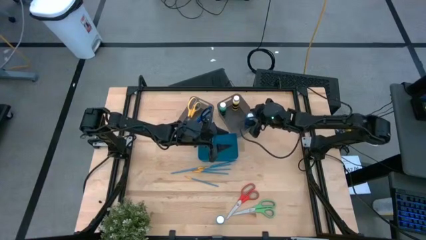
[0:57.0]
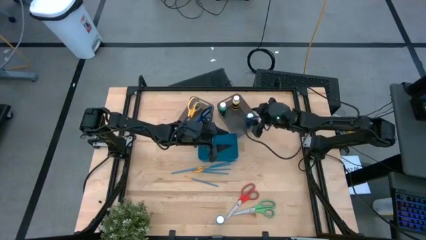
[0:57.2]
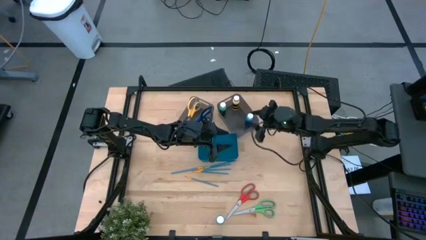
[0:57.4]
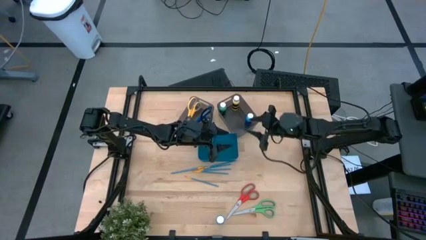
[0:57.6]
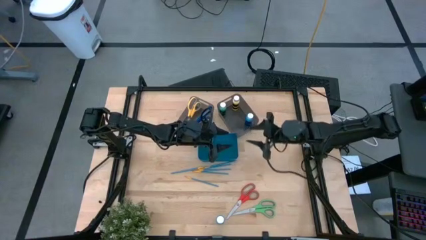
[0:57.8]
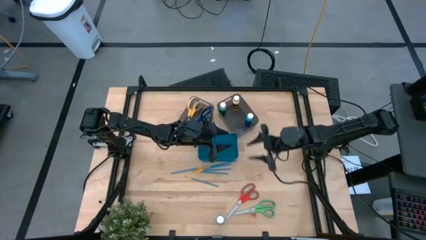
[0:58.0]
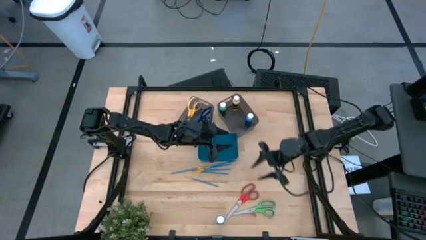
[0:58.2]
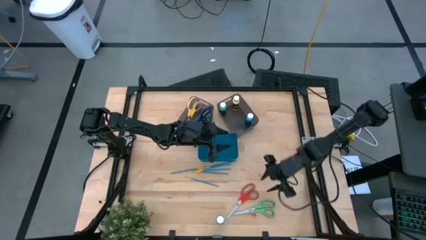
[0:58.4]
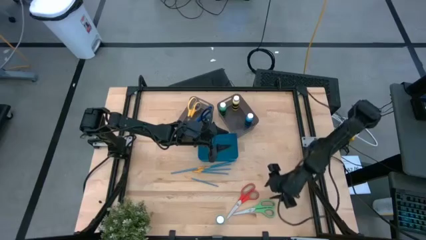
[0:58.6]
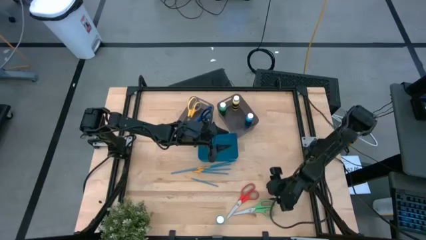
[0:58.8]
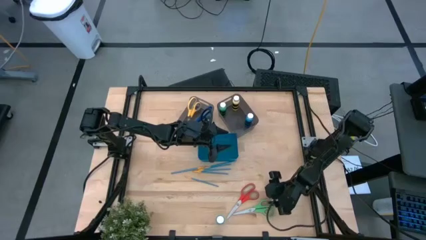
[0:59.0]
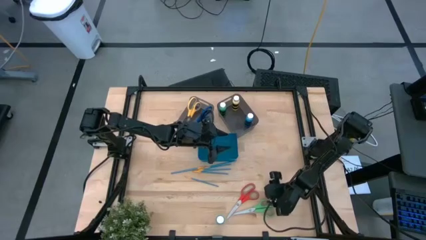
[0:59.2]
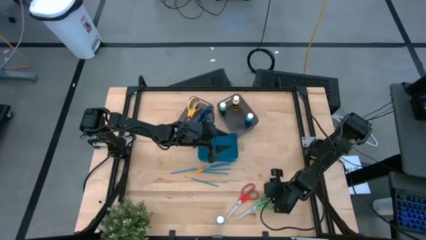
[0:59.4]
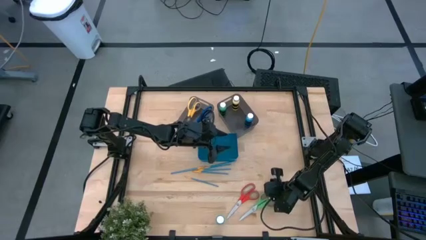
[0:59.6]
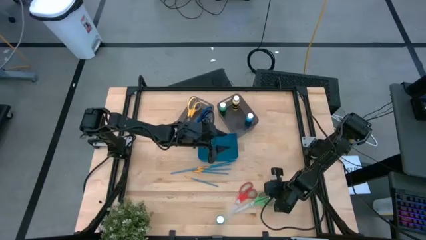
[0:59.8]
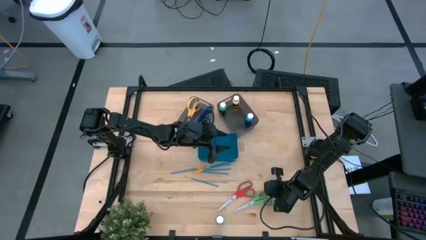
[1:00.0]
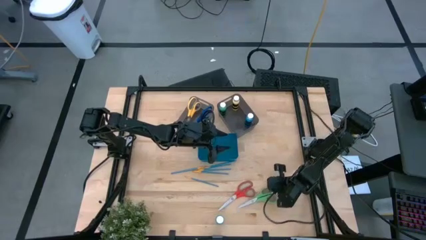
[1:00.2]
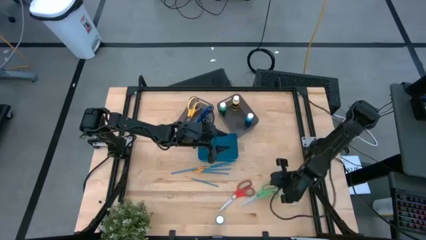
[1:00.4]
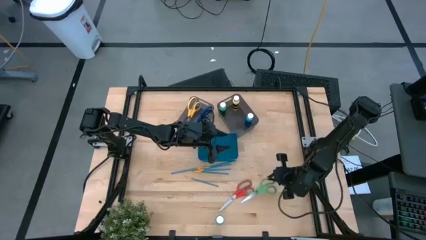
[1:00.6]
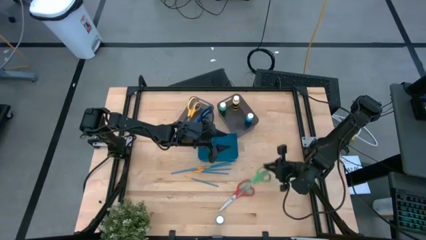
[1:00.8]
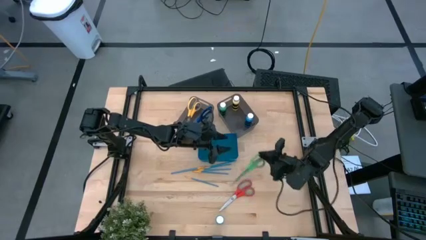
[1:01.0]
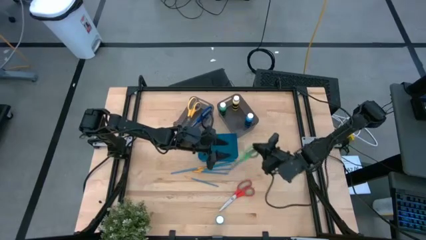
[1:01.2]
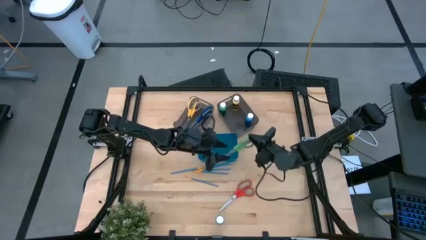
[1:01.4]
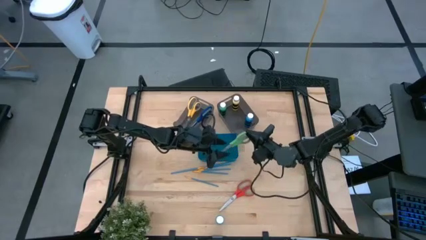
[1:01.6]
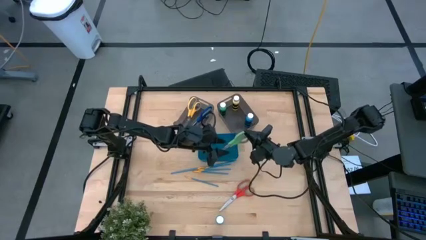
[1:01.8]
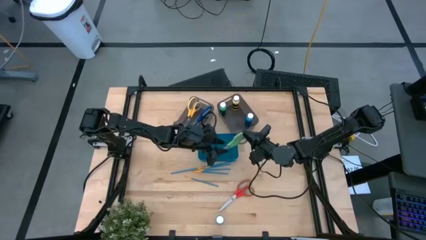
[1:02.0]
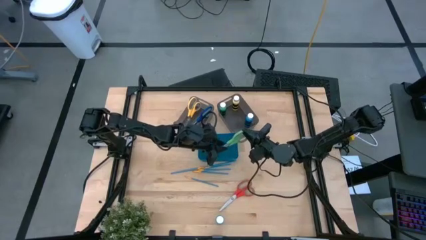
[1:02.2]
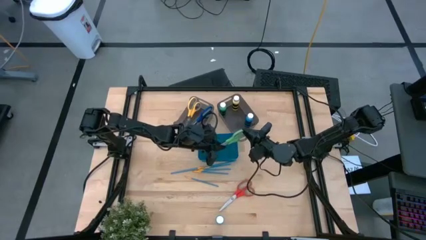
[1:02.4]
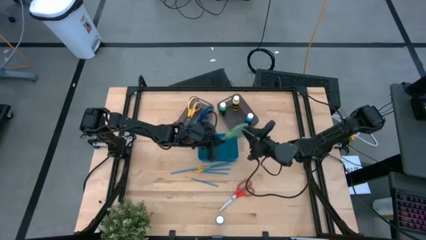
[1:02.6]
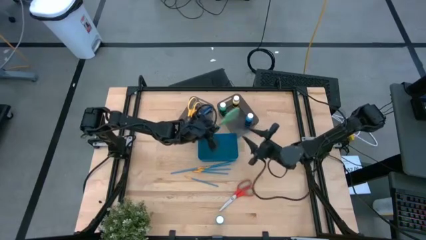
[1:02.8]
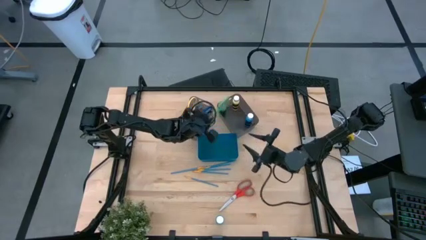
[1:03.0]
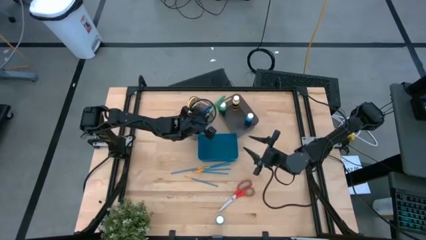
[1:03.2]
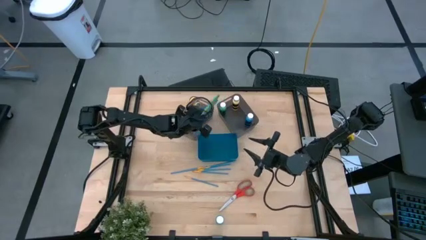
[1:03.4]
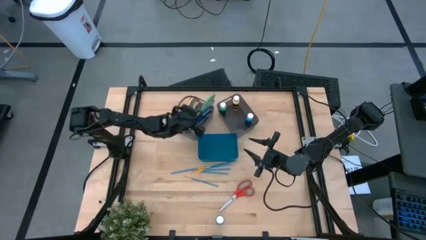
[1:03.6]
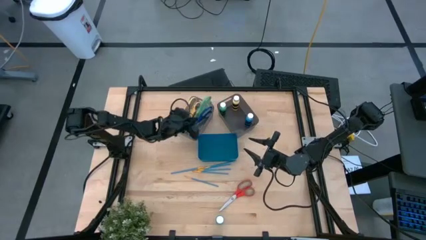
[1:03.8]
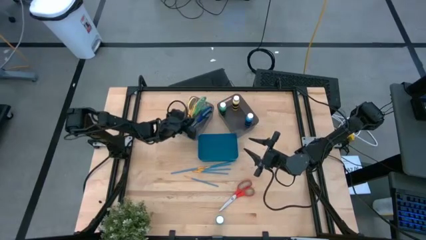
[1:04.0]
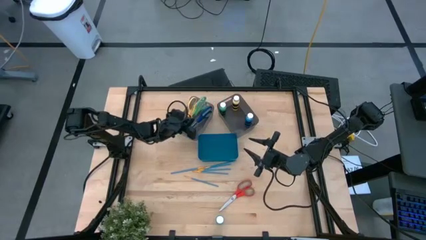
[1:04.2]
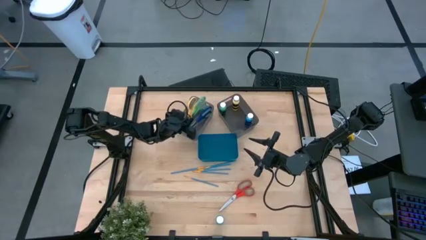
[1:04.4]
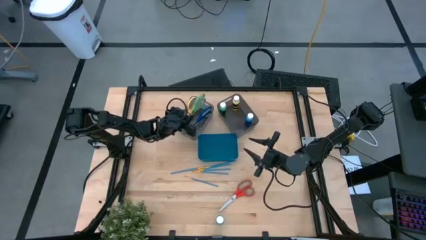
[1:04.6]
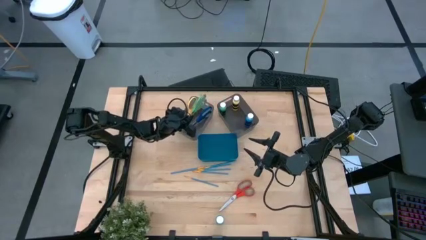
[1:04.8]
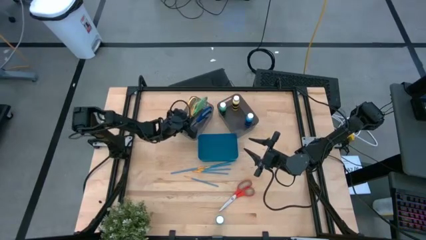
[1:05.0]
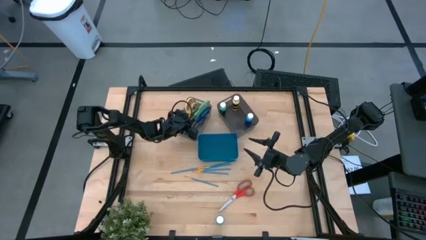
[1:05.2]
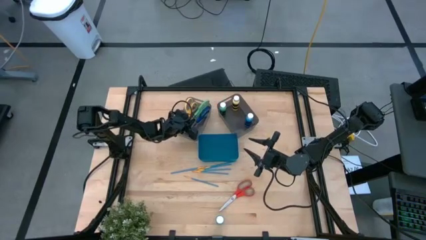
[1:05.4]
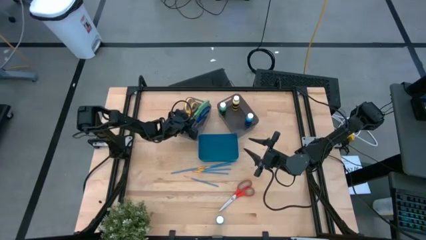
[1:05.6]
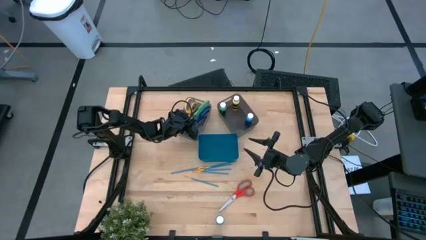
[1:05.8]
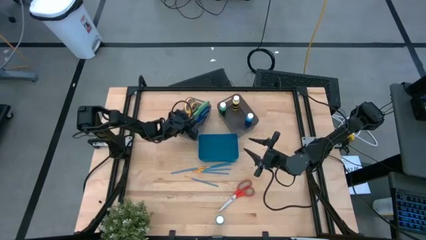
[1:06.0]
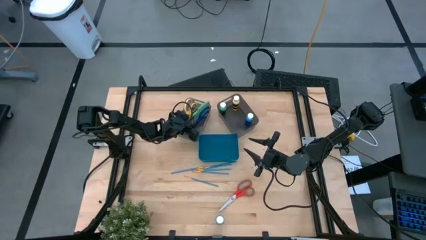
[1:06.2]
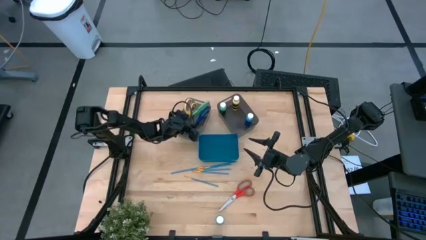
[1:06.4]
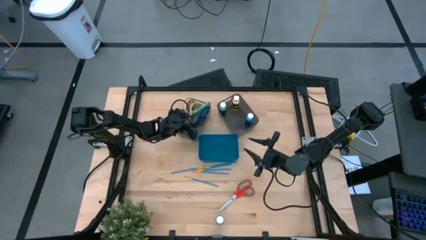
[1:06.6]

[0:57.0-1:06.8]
Task: Pick & Place Paint Supplies
Put the green scissors into the left black bin

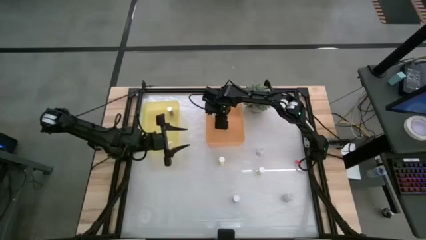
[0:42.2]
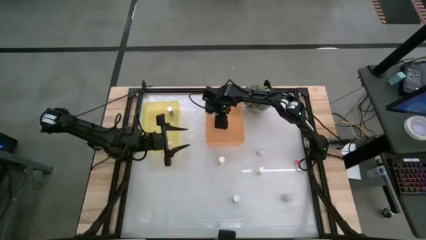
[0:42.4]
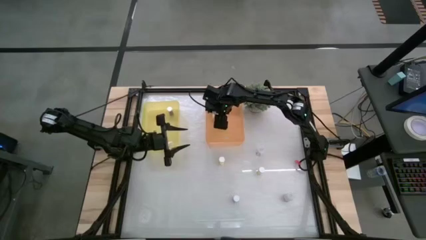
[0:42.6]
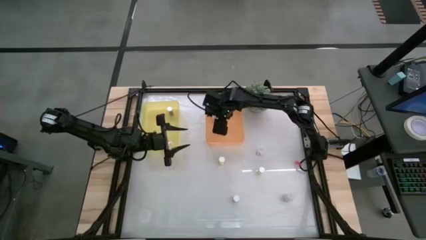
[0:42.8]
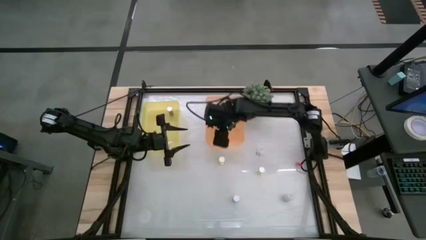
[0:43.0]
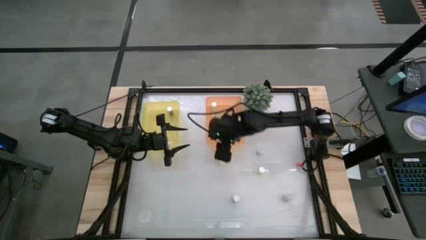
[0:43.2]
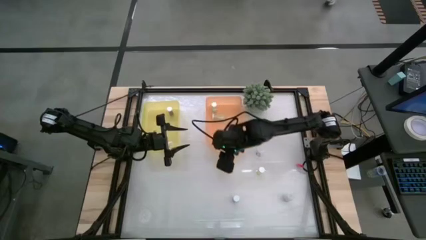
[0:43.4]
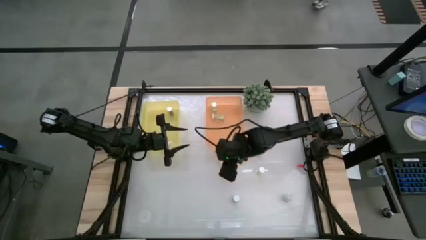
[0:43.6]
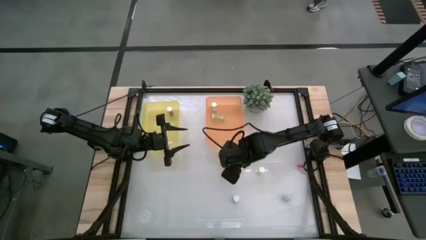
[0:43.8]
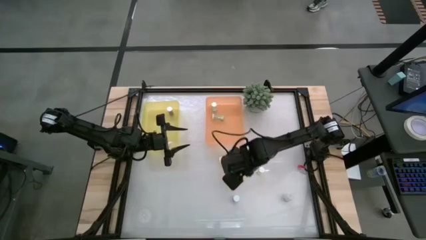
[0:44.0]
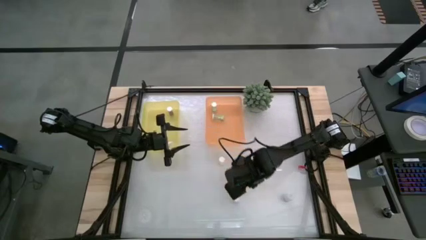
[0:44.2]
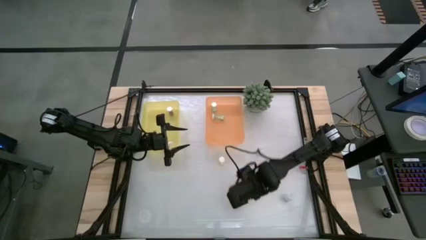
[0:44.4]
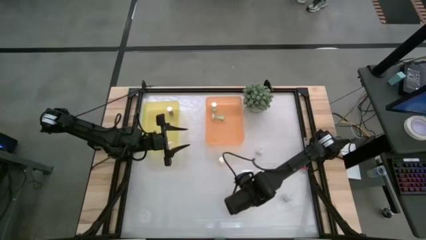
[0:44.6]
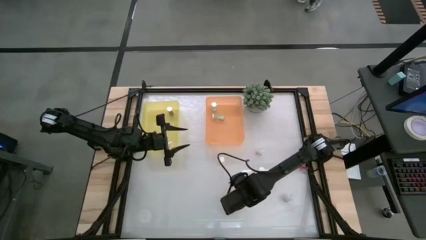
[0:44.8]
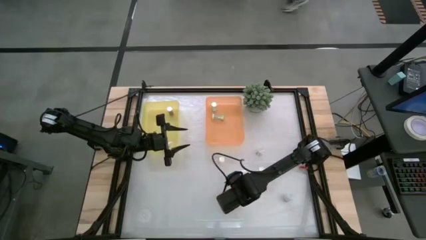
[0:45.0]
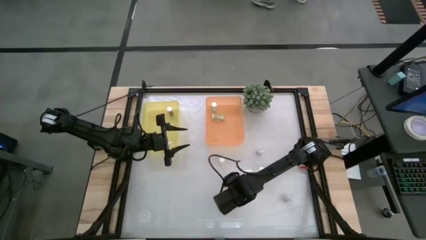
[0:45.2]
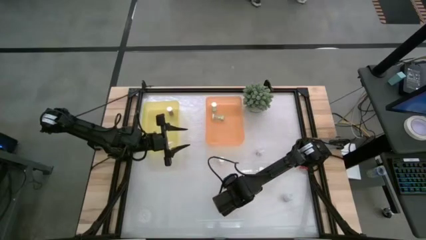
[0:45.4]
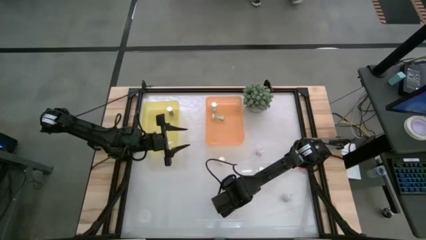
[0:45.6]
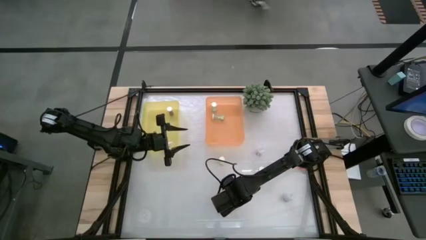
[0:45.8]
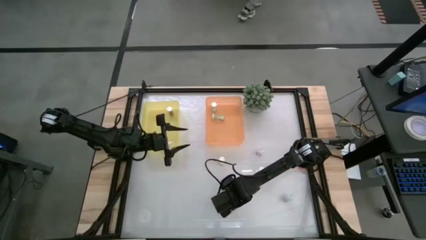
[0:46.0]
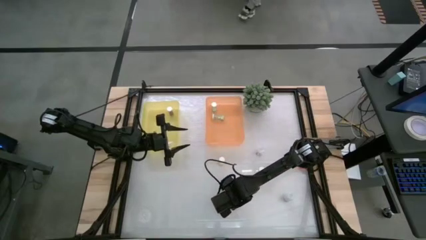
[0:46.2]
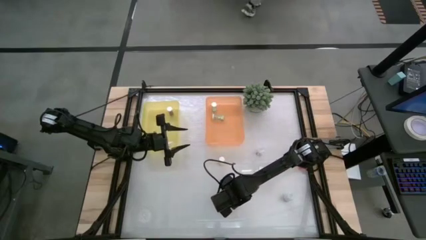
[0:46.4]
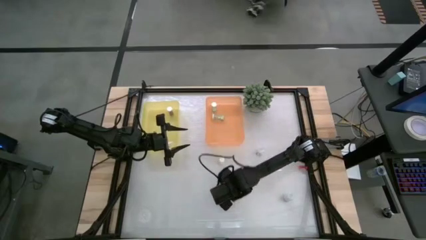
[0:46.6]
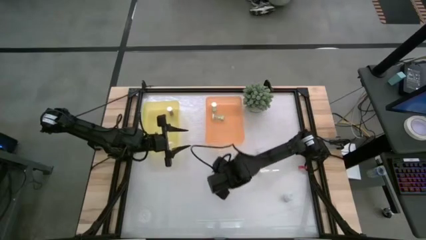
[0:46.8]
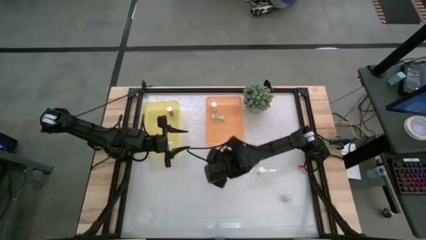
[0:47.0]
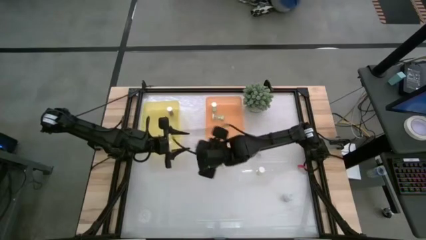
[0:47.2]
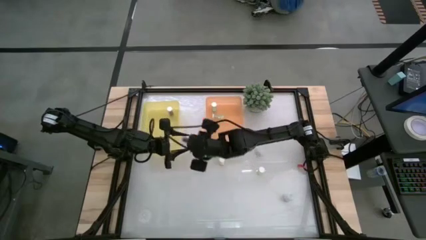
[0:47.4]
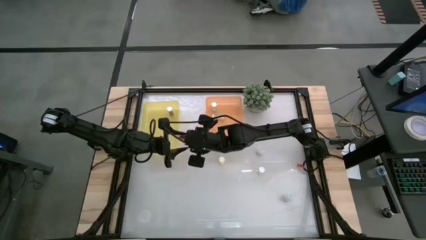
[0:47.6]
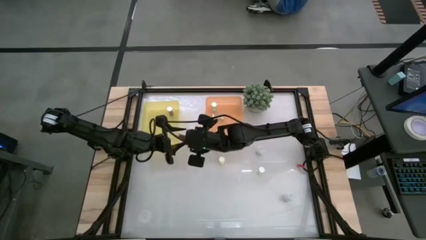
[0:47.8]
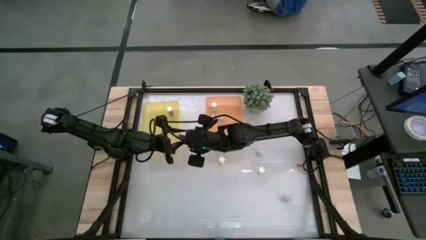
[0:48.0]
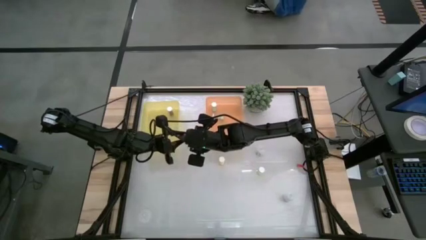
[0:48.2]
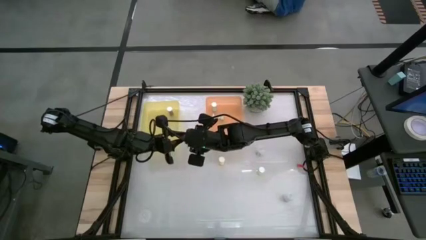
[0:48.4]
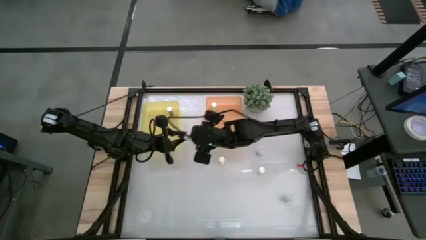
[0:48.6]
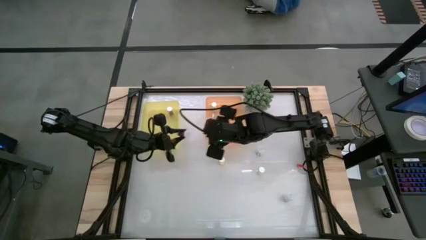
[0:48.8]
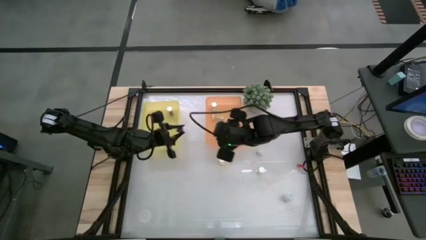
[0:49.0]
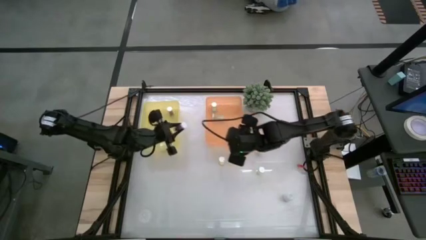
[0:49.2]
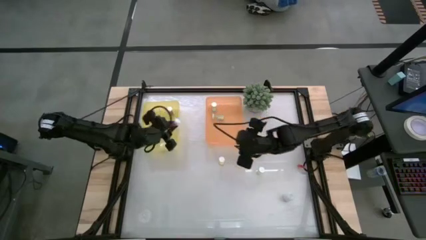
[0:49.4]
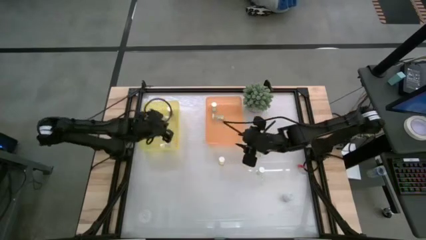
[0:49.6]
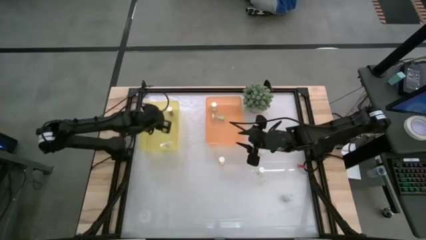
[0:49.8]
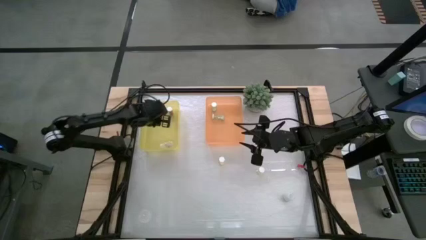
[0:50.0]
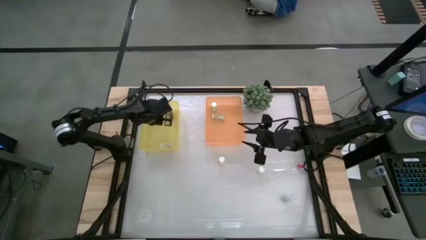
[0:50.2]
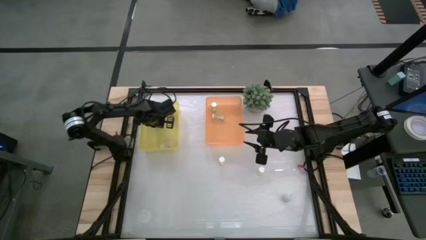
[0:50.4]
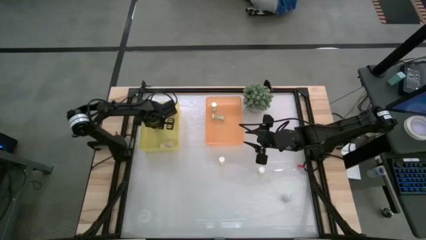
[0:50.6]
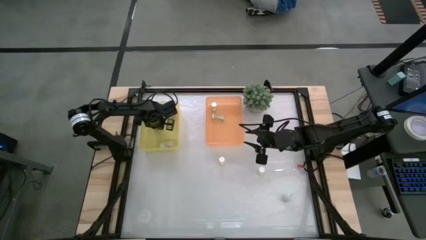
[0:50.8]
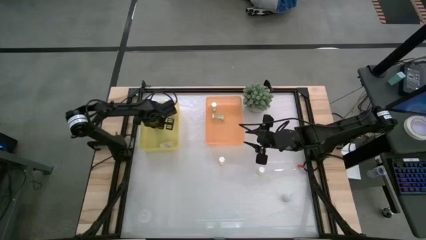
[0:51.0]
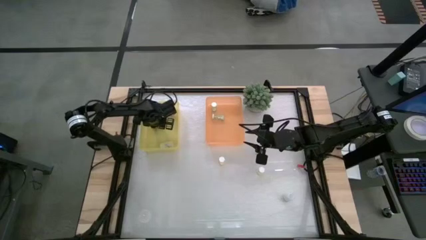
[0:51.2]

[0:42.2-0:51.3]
Task: Pick and place medicine bottles into bin by pill shape (circle, oval)
Put the blue capsule bottle into the yellow bin
